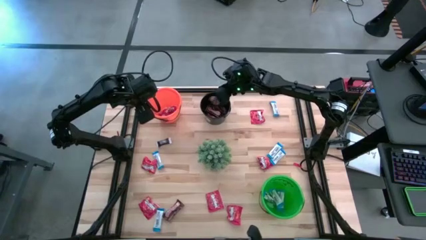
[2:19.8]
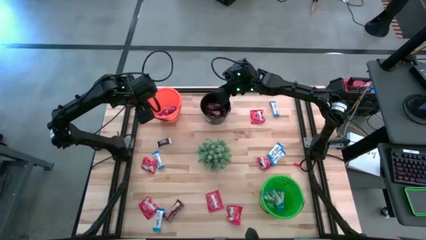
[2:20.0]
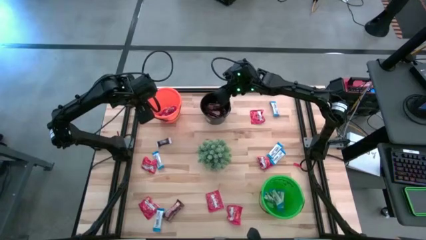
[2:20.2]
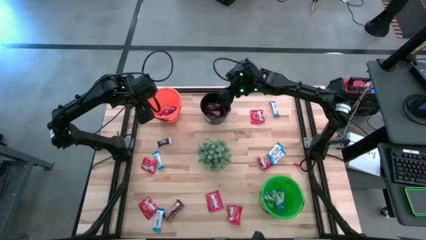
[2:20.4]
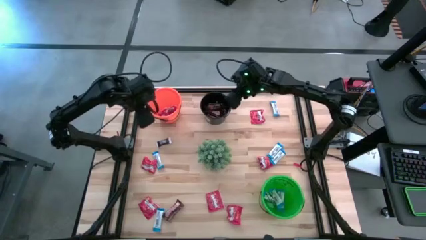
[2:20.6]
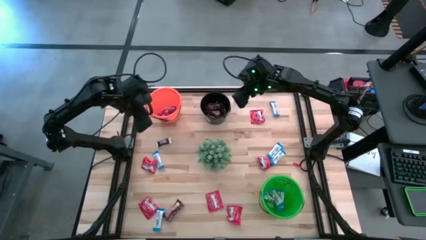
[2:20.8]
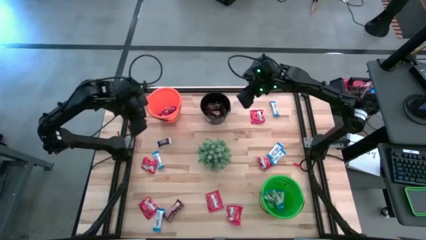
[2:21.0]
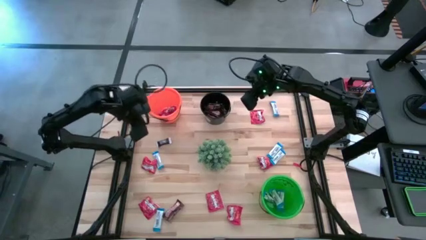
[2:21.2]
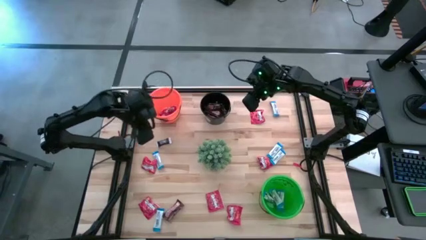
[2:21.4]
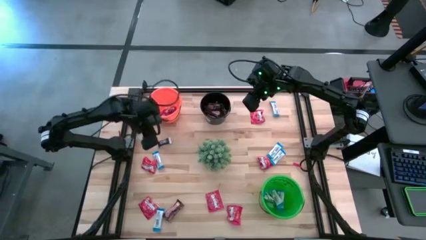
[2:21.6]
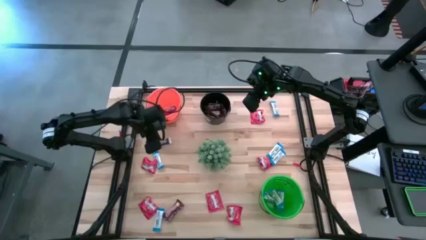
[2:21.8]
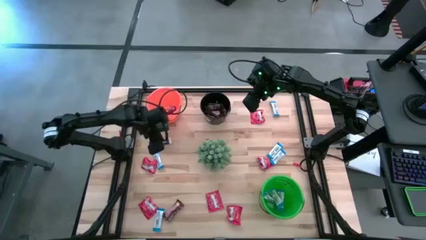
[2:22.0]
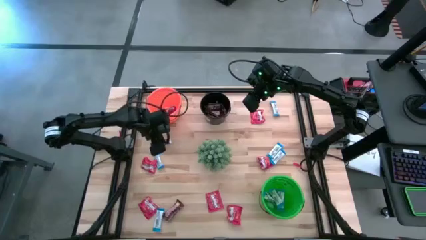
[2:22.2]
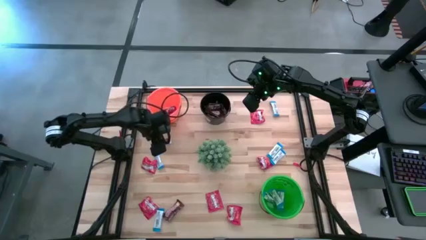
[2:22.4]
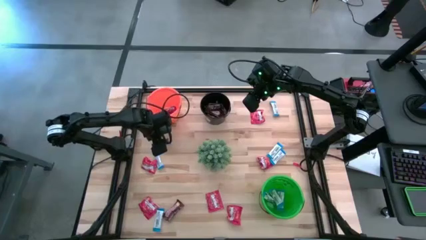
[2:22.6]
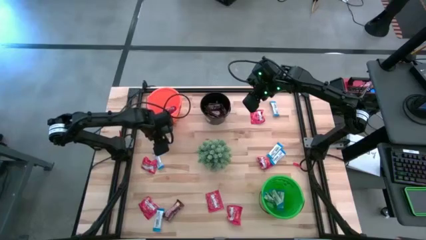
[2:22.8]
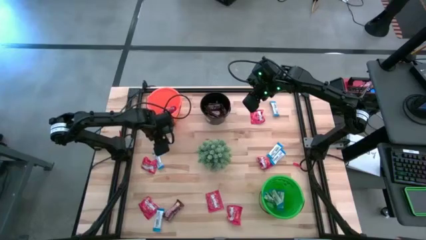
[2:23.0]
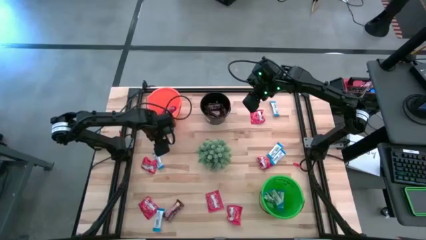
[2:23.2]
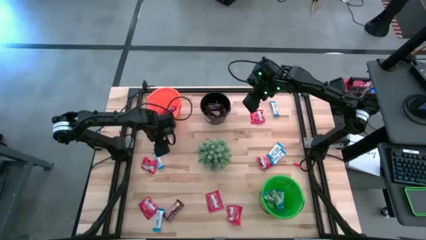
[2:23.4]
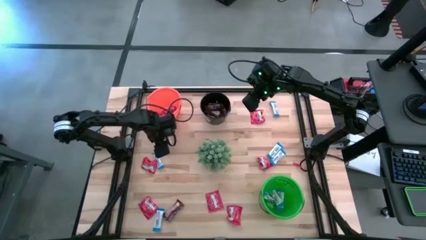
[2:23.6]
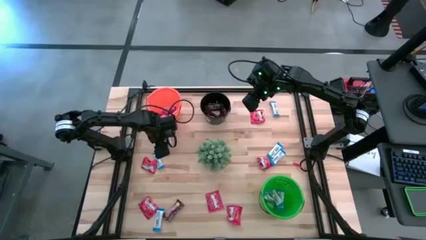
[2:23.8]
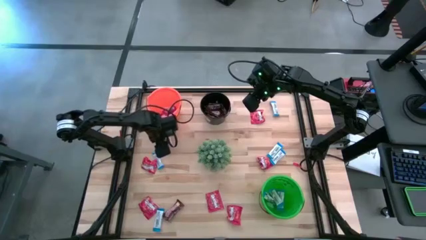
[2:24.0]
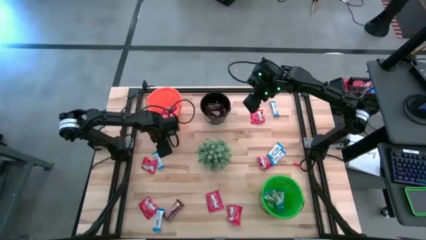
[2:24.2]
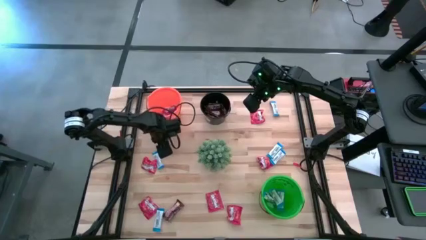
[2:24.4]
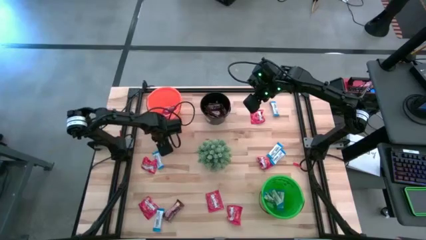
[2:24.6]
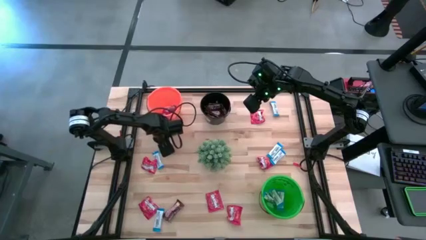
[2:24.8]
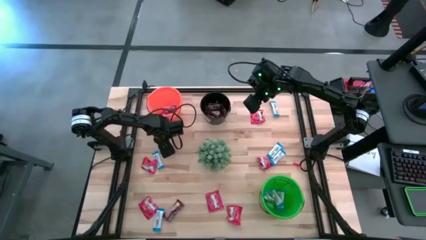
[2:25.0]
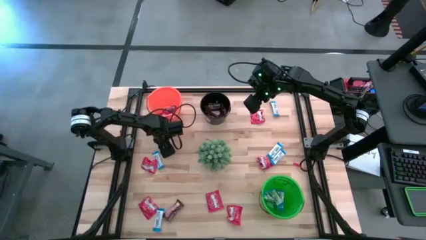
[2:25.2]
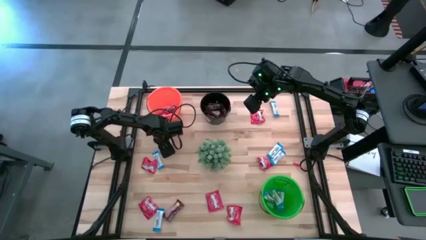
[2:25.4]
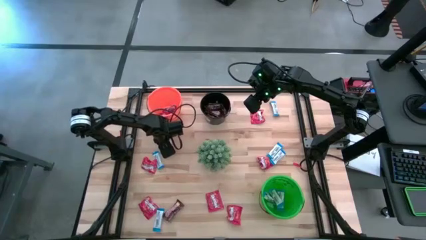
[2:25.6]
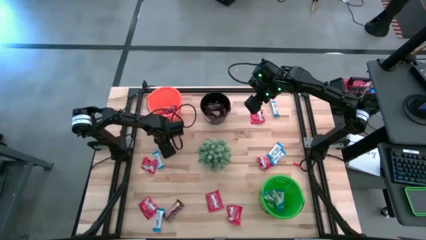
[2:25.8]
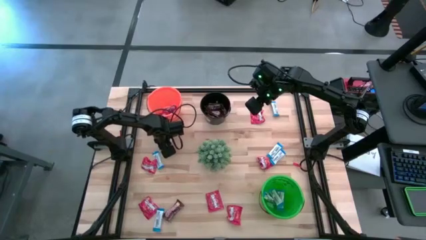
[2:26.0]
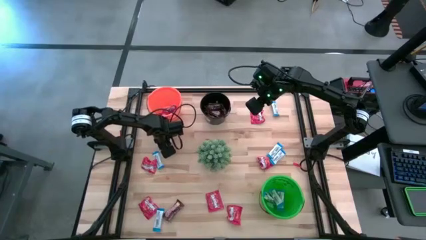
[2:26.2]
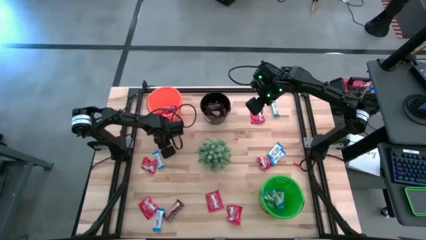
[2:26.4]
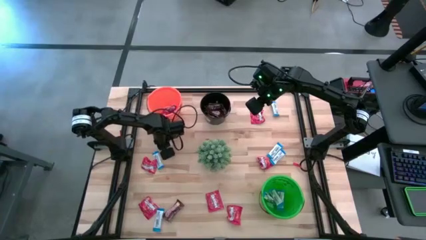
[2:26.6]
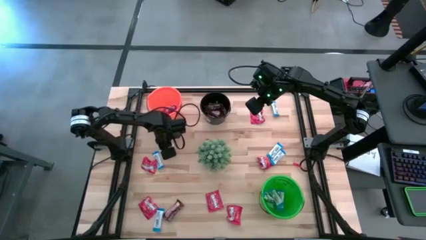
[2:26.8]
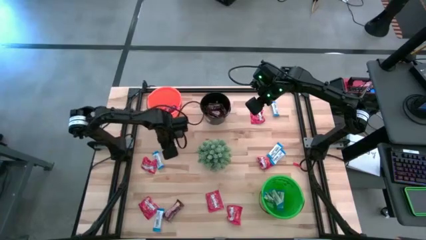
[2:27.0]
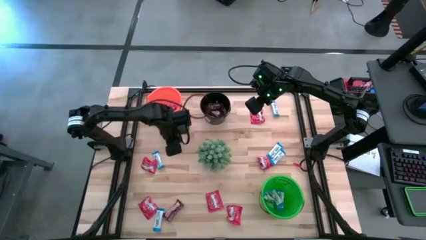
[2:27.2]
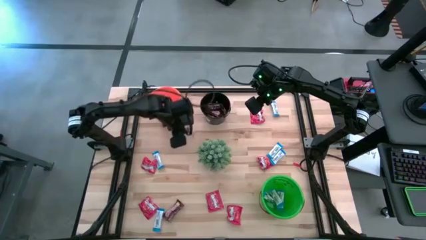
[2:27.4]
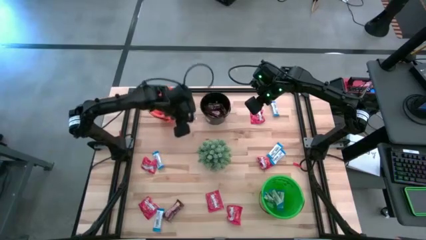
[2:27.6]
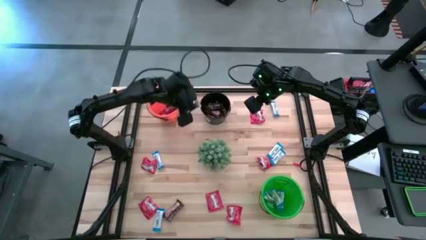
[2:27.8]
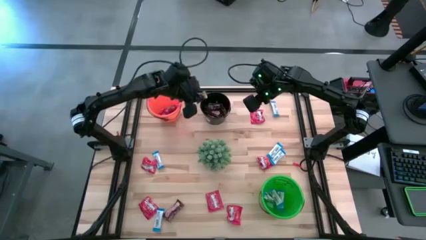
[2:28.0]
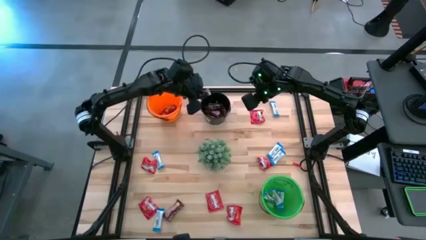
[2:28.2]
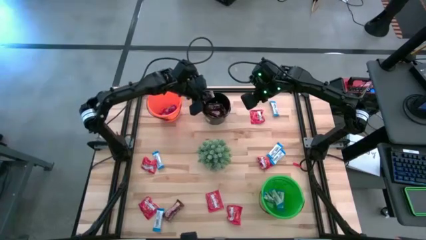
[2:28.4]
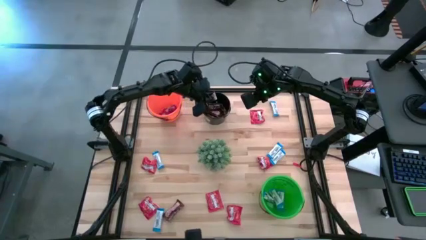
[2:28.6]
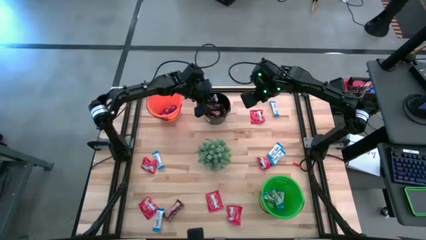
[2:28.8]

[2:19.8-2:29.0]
Task: Sort candy
Put the dark brown chocolate into the black bucket

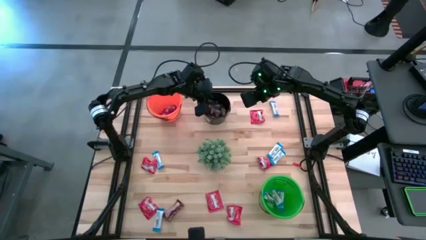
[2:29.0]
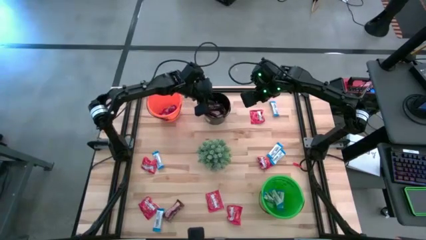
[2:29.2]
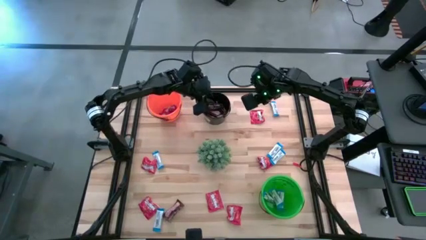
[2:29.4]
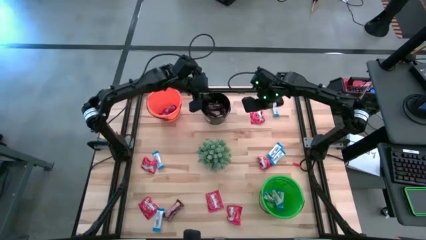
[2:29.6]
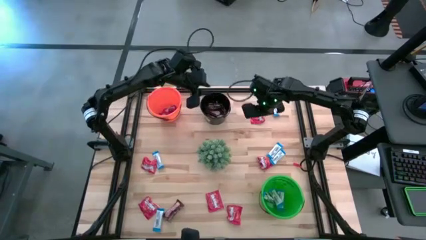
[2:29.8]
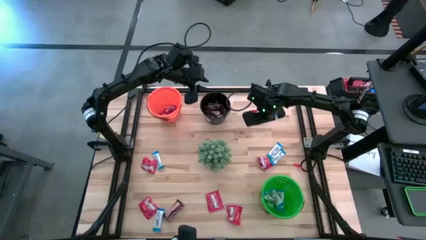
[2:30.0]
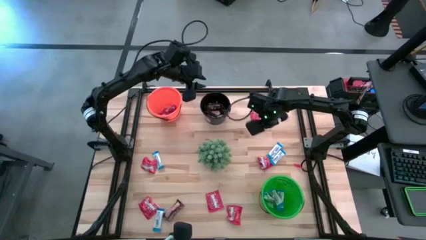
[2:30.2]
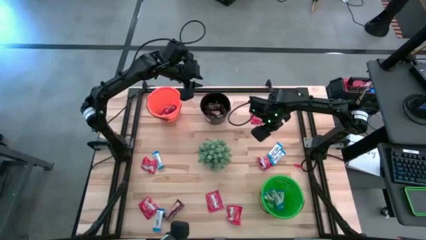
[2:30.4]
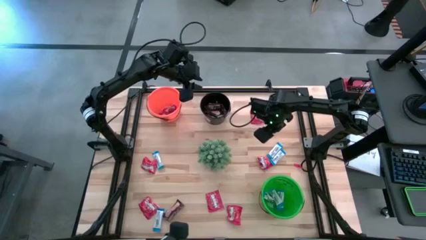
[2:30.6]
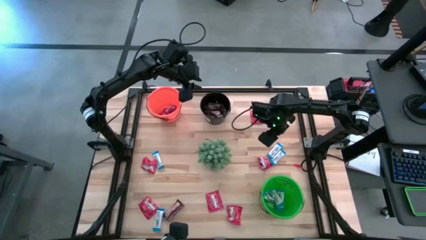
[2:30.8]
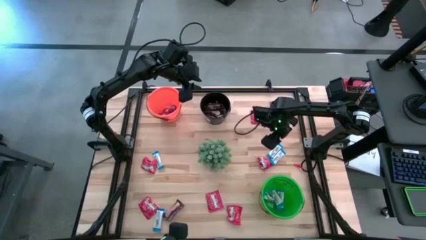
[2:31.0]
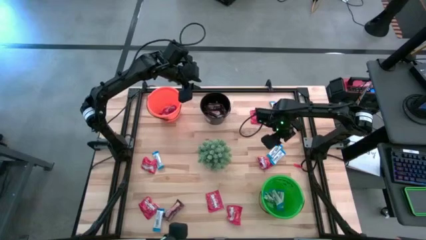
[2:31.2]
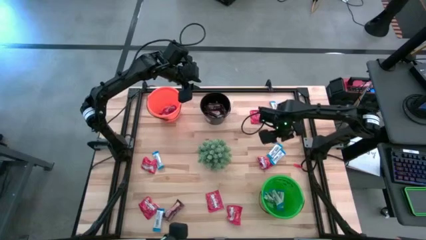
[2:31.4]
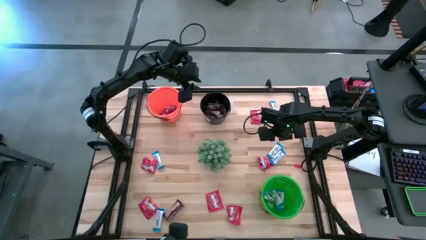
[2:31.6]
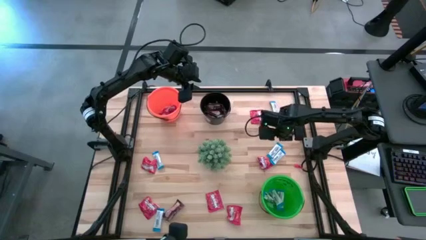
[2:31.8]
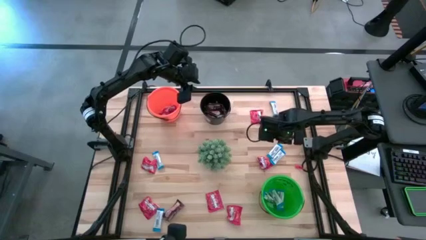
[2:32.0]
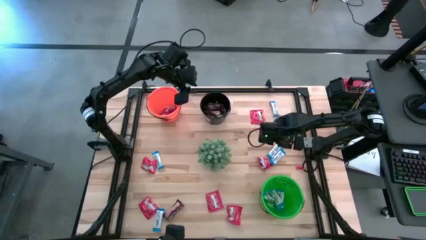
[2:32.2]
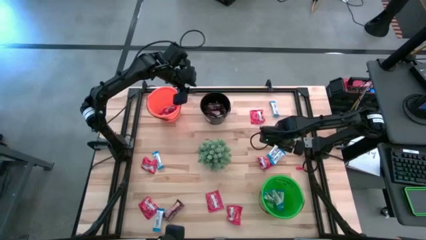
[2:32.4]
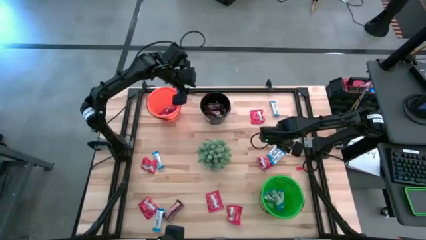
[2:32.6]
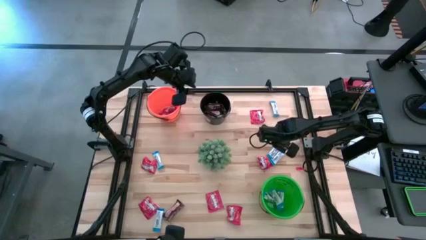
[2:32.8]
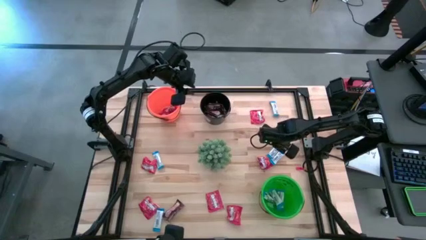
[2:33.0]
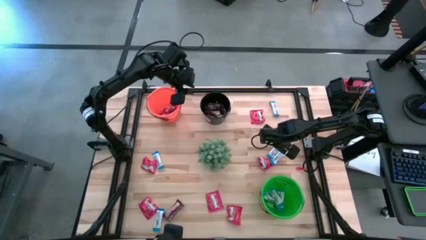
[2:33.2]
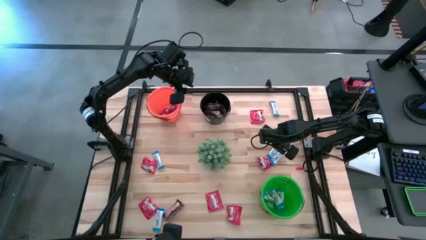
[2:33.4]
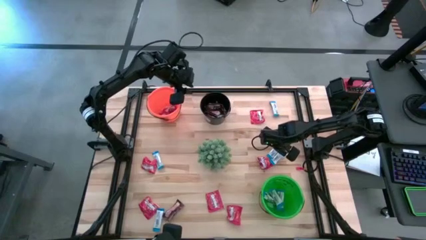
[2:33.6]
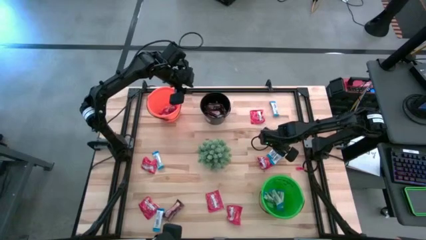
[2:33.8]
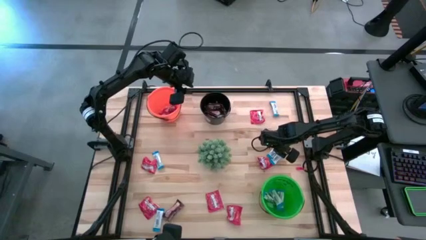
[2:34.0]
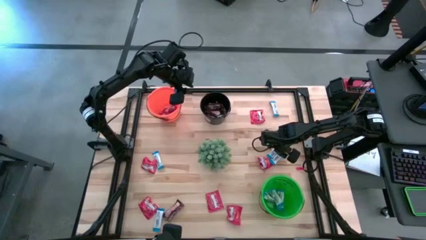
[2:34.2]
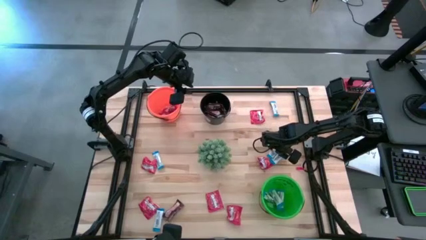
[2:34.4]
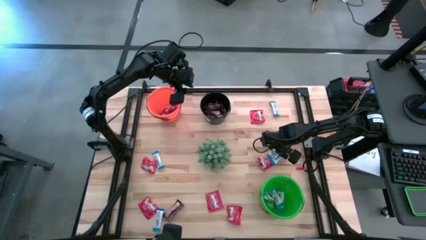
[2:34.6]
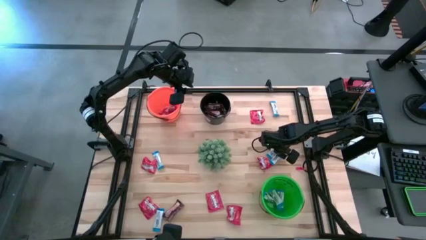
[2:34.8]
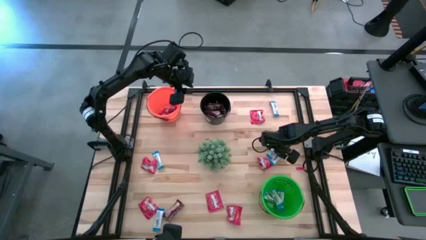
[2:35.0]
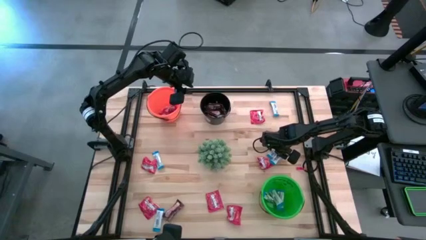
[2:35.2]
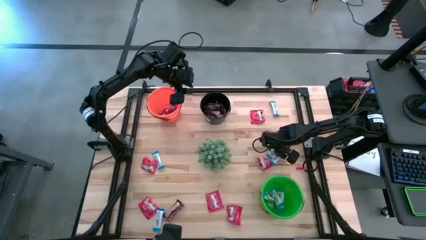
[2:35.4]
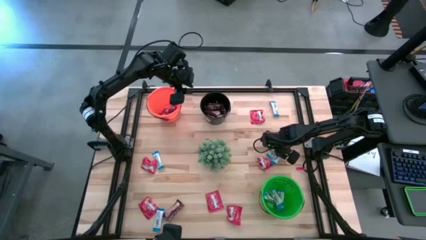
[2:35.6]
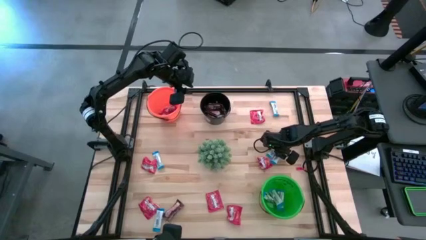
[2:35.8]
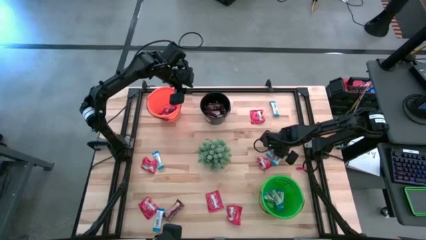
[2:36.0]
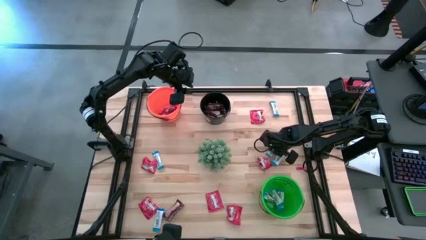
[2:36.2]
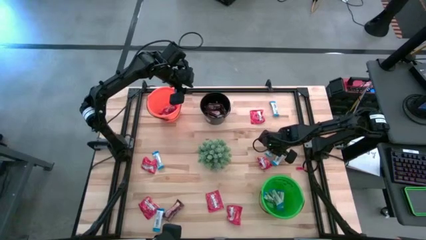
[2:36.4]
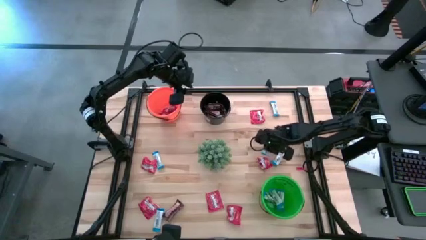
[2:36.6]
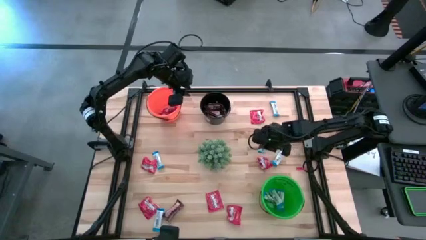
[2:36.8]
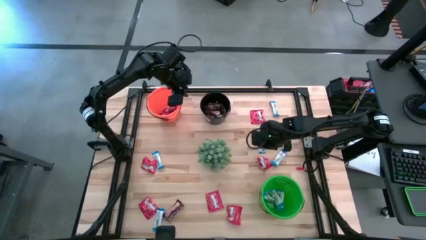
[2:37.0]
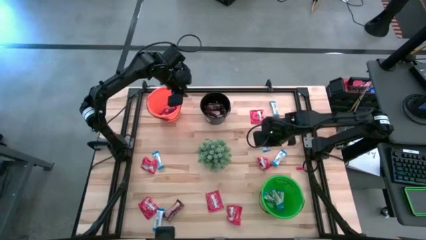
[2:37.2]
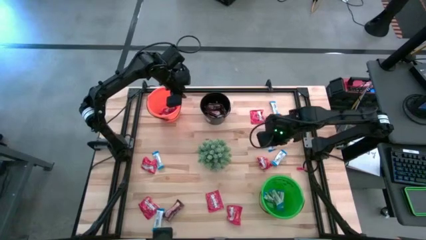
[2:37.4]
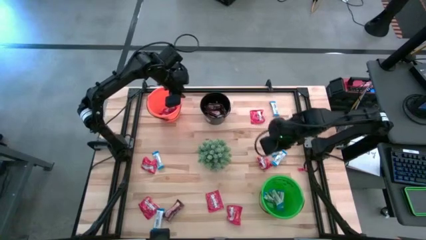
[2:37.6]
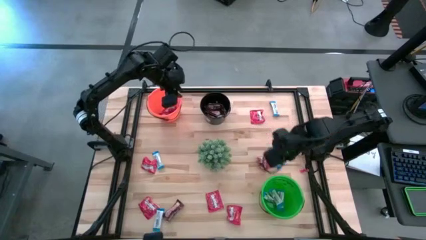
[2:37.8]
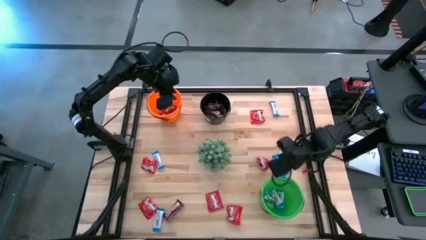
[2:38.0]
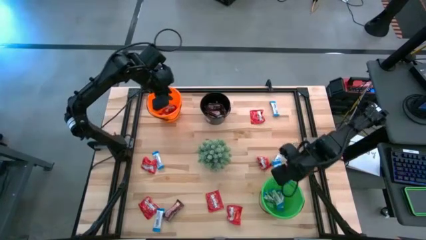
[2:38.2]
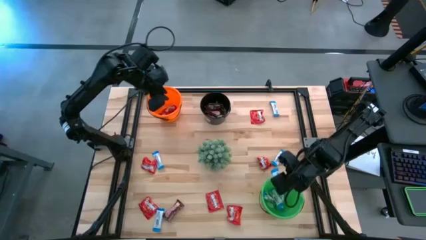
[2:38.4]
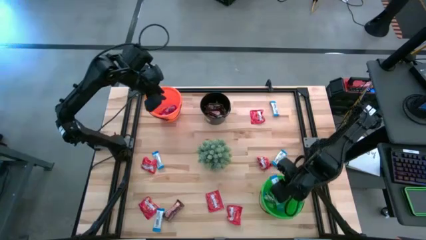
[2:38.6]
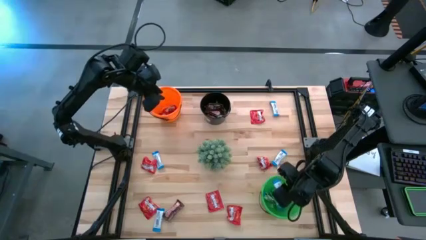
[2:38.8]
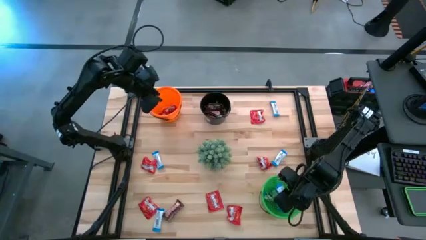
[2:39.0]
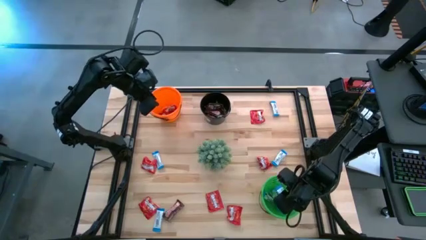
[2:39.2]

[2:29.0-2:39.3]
Put the blue chocolate into the green bucket
